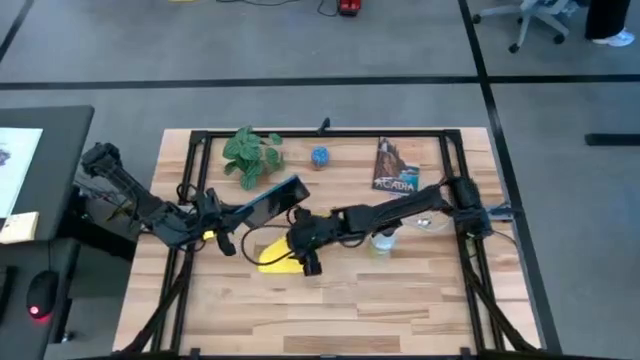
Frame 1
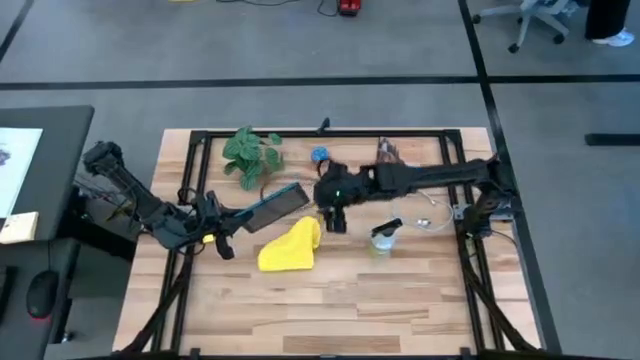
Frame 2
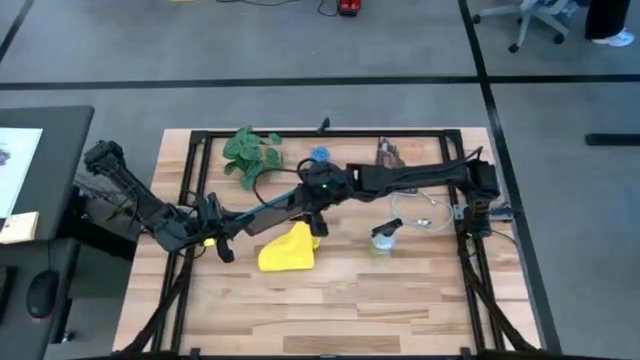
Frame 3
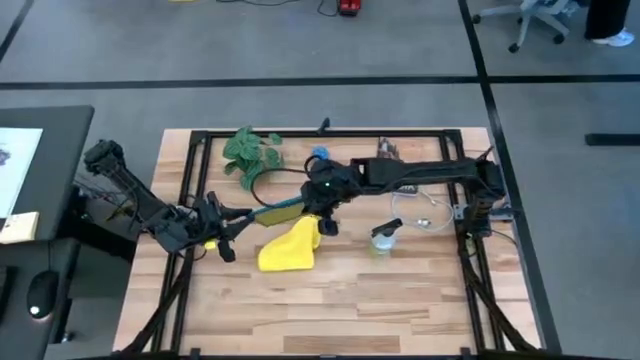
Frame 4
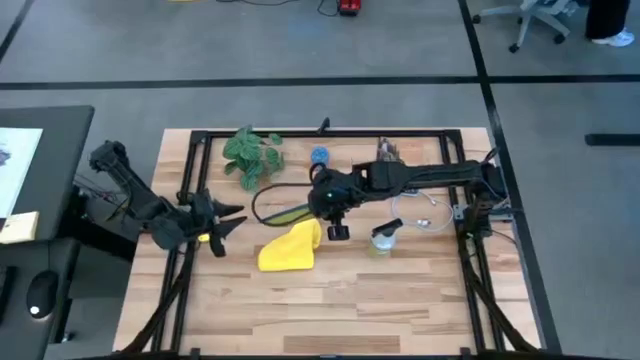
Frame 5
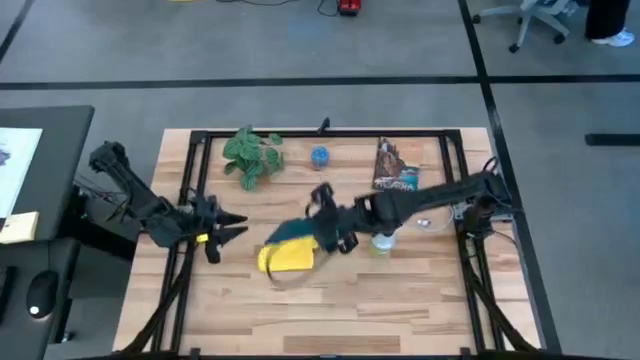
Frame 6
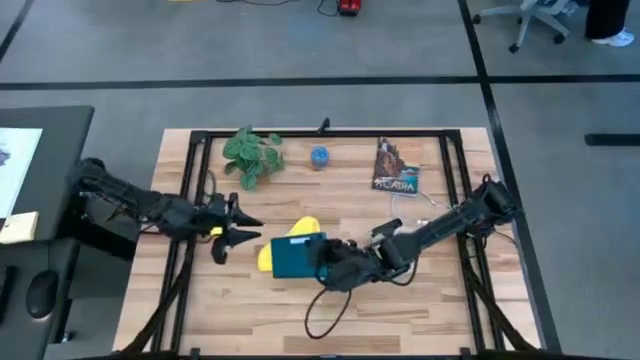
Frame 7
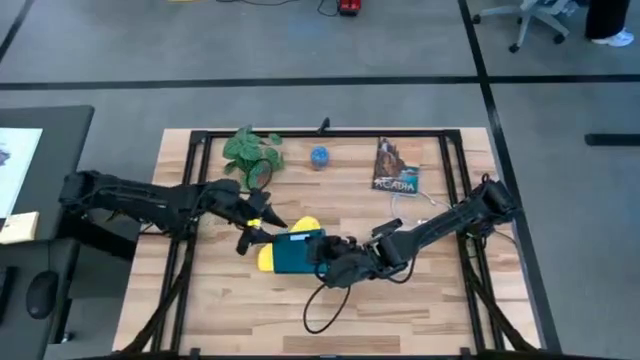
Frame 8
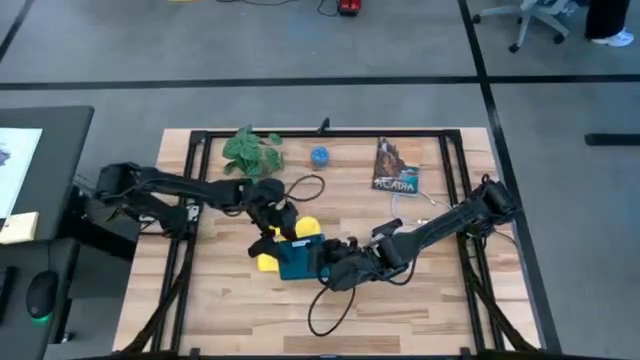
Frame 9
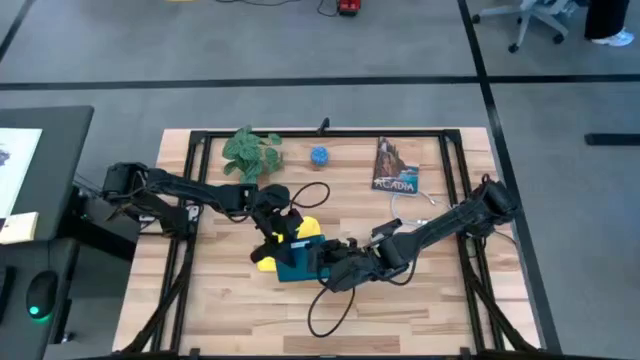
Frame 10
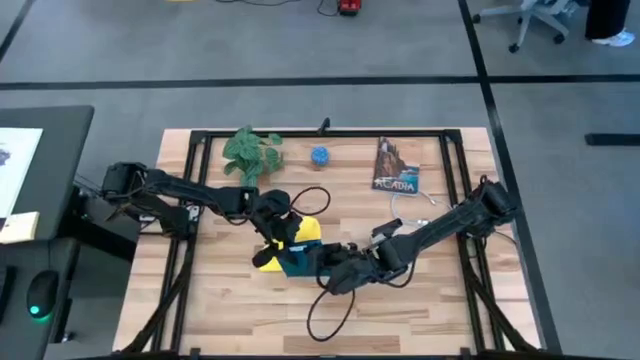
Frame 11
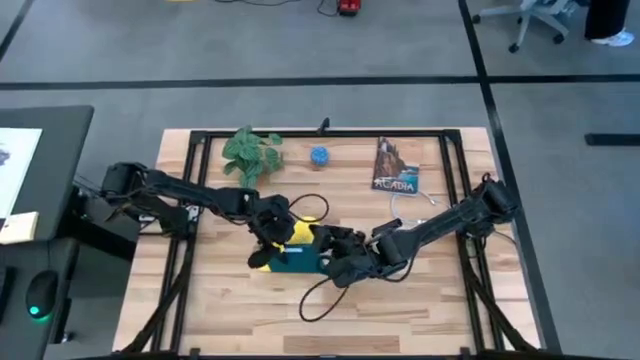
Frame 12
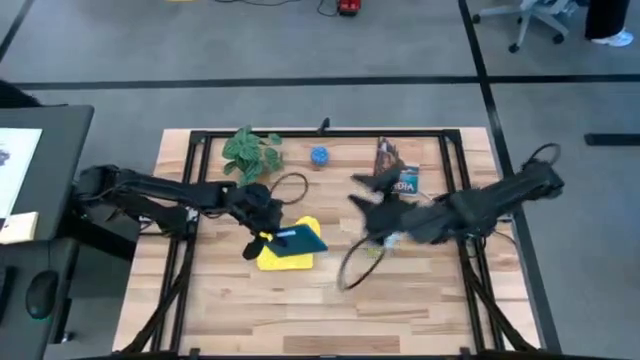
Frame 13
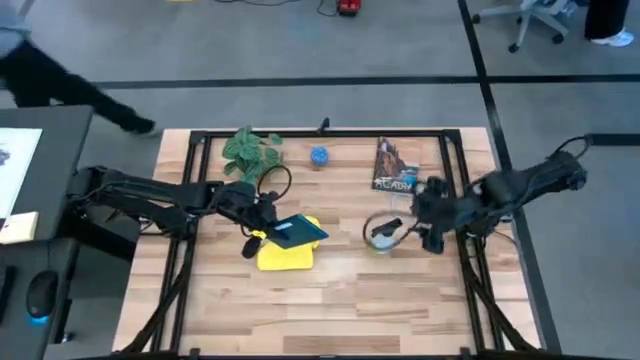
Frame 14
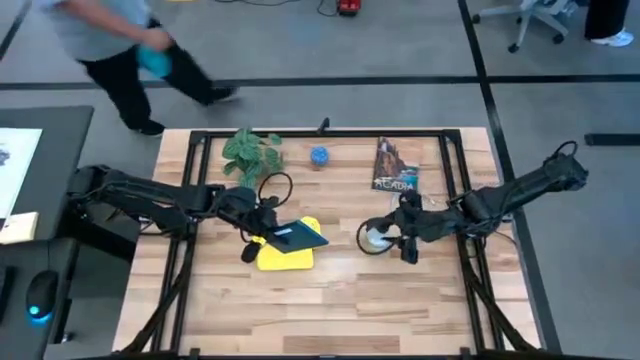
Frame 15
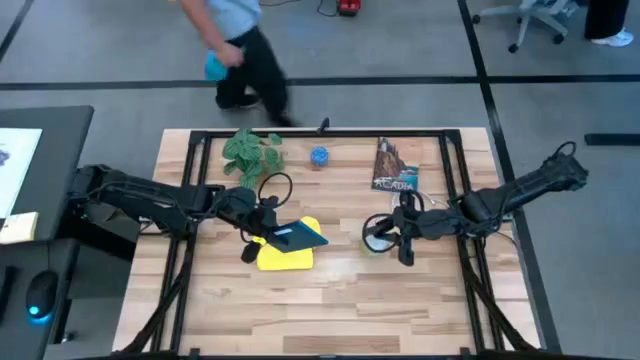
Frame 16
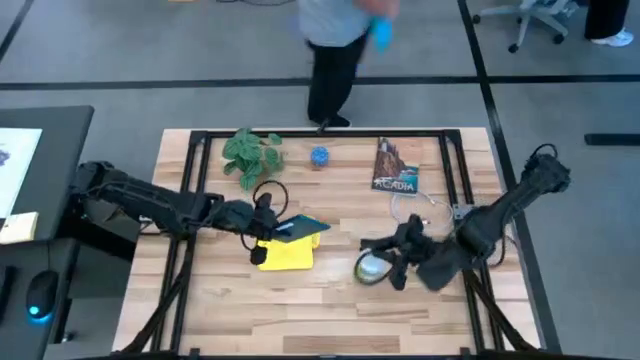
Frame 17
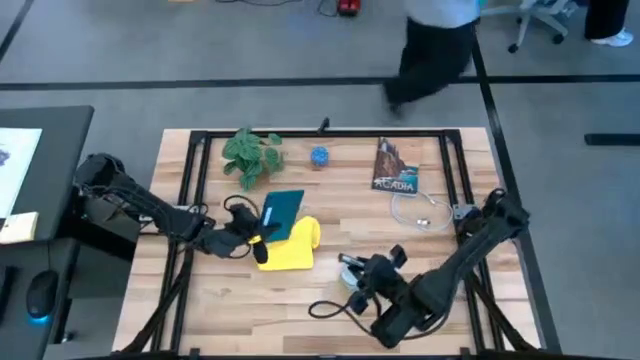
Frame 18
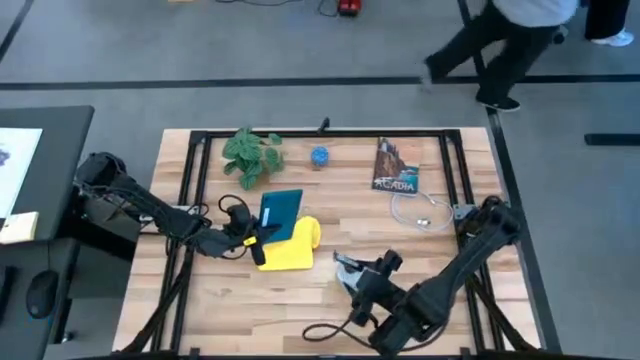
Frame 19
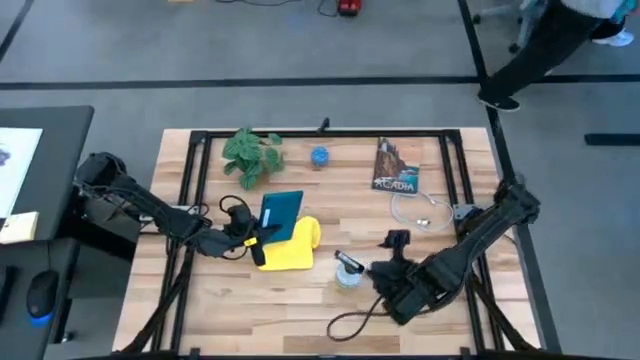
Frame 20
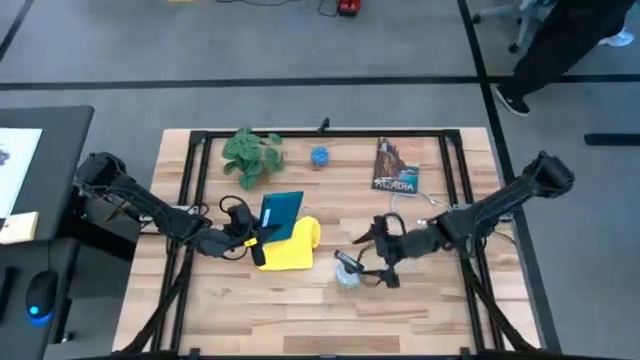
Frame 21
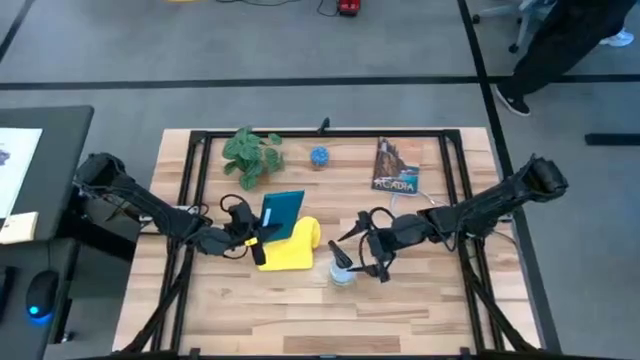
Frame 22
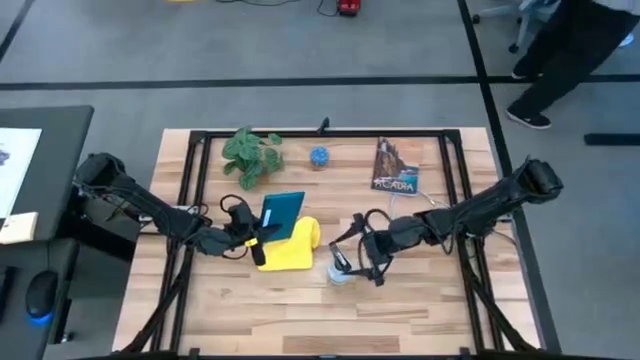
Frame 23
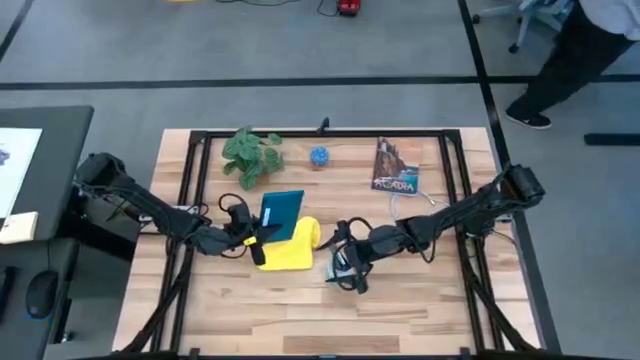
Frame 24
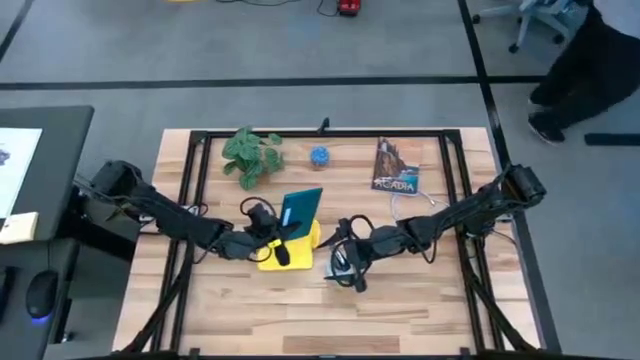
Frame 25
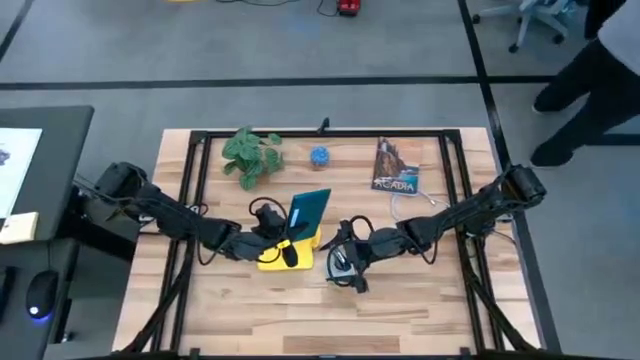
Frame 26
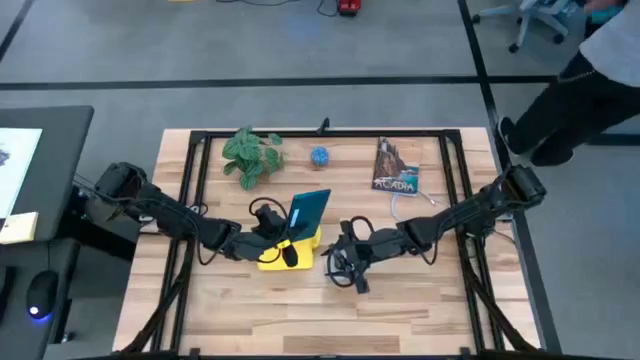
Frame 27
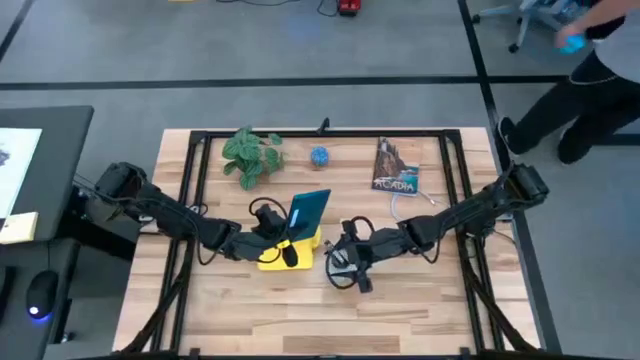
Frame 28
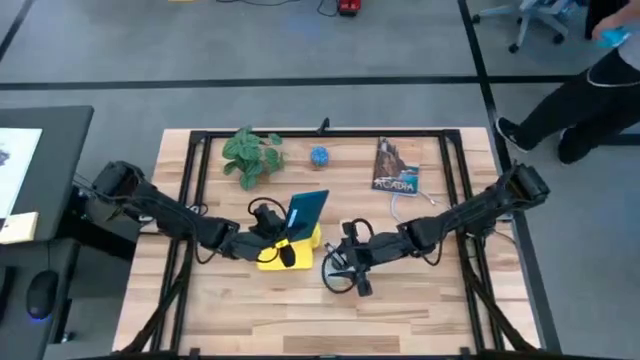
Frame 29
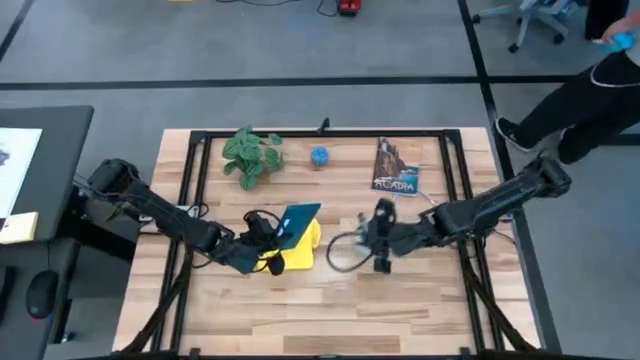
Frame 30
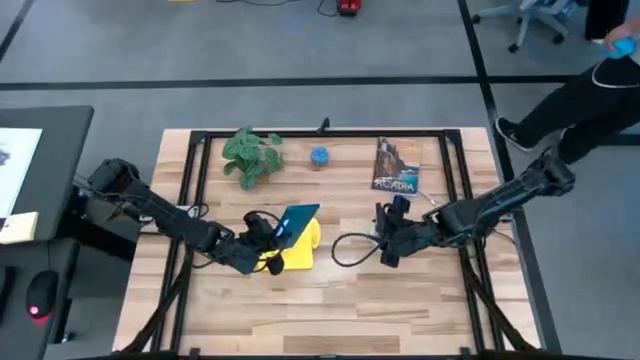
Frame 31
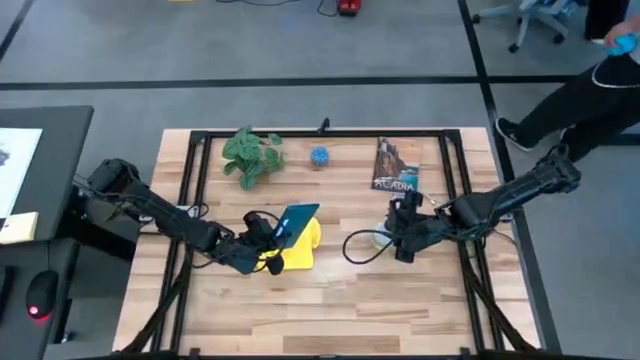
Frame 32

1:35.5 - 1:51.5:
Task: Apply microfiber cloth
Spray the blue tablet with the white spray bottle

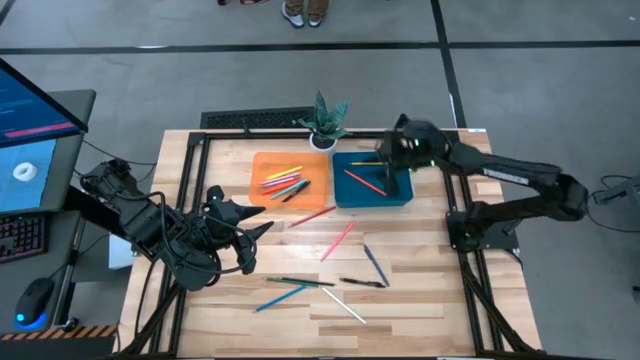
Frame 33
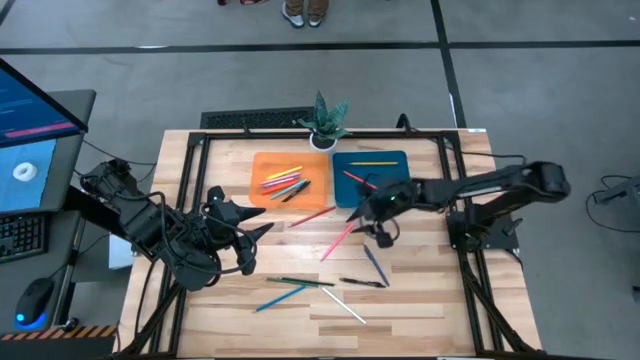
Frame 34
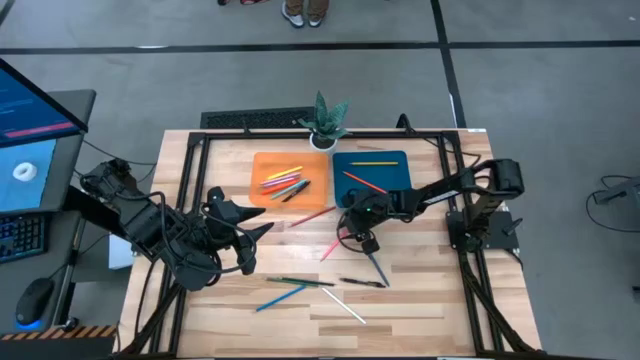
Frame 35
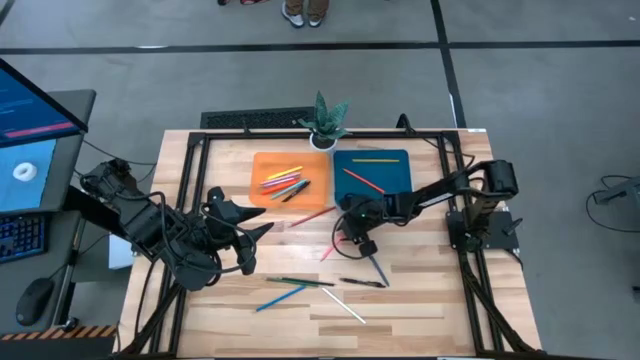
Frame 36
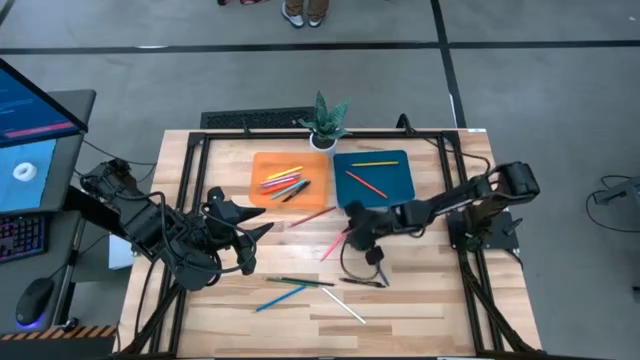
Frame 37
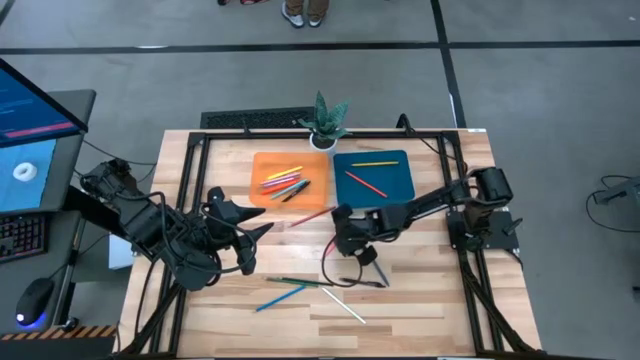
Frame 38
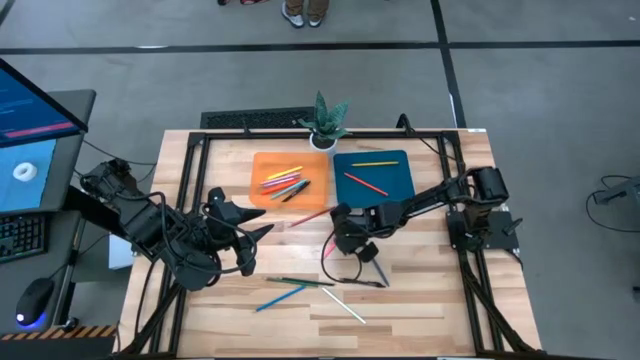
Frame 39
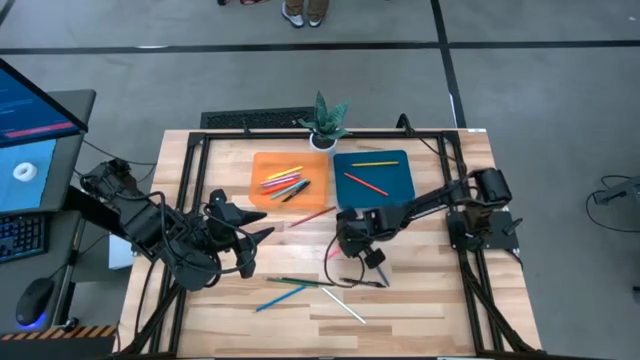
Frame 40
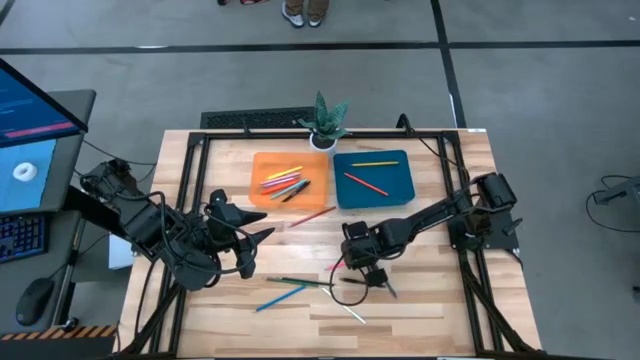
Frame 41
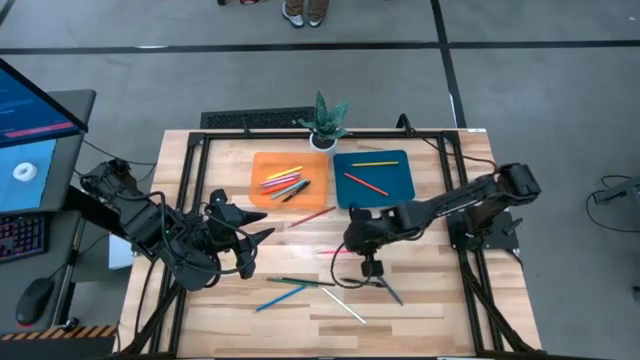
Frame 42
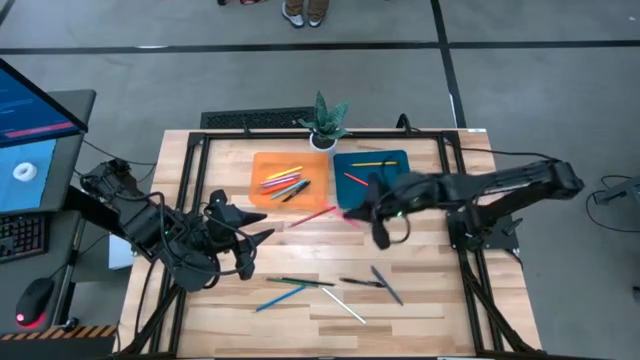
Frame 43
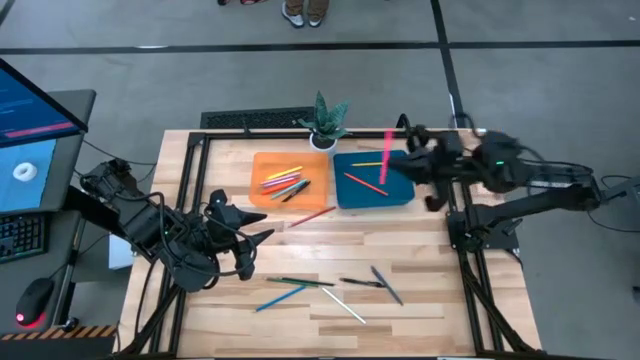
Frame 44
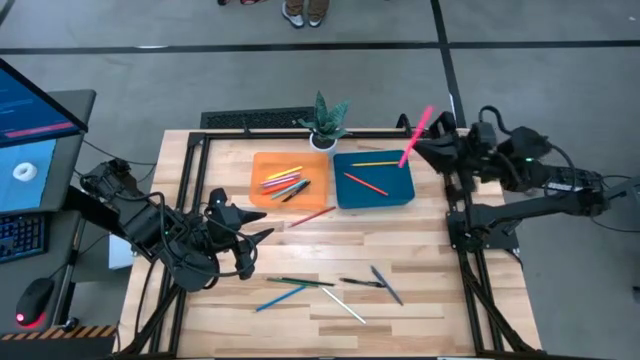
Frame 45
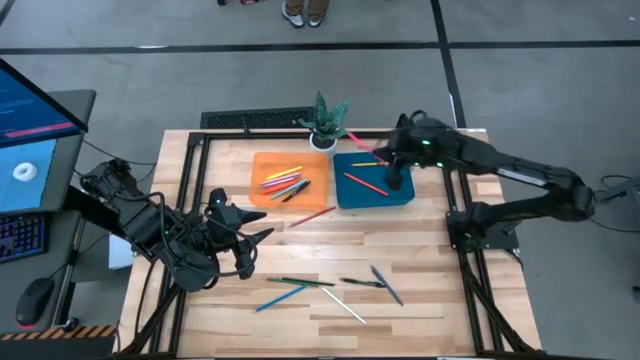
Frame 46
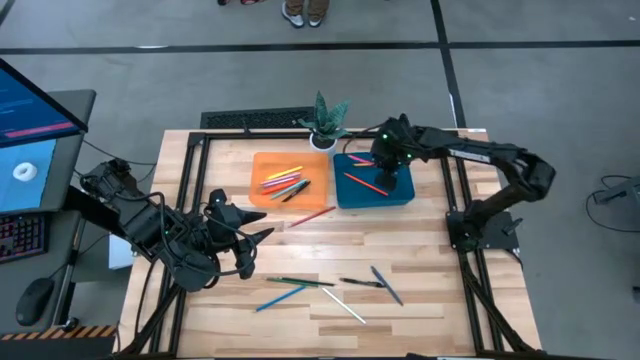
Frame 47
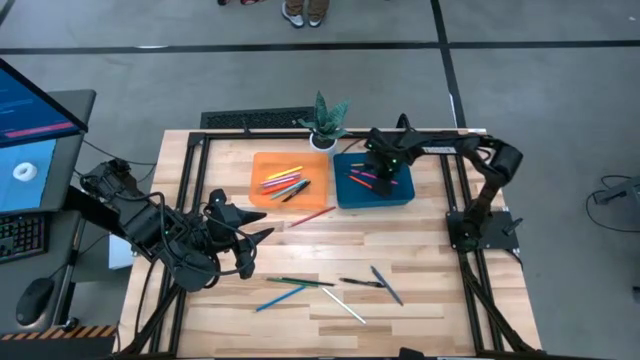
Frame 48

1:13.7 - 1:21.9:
Task: Sort pens & pencils
Put the pink pencil into the blue bin
